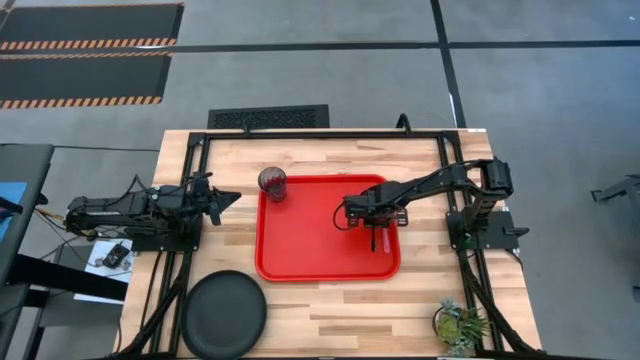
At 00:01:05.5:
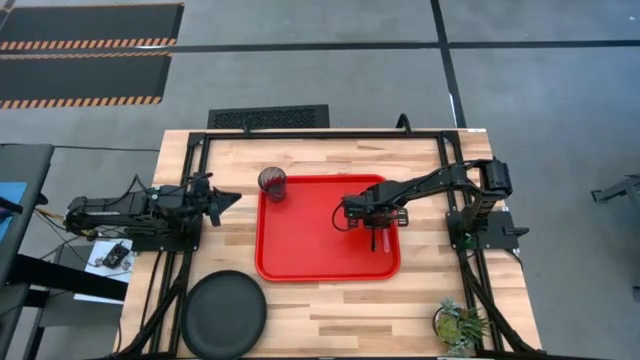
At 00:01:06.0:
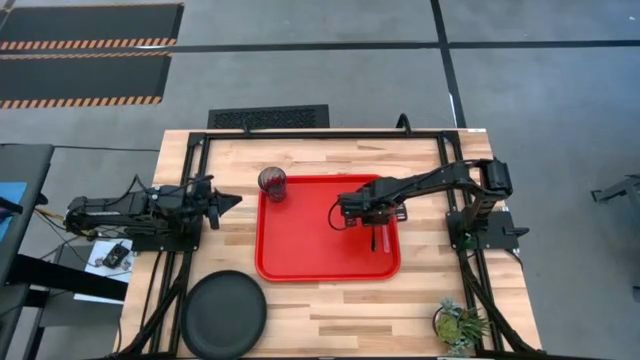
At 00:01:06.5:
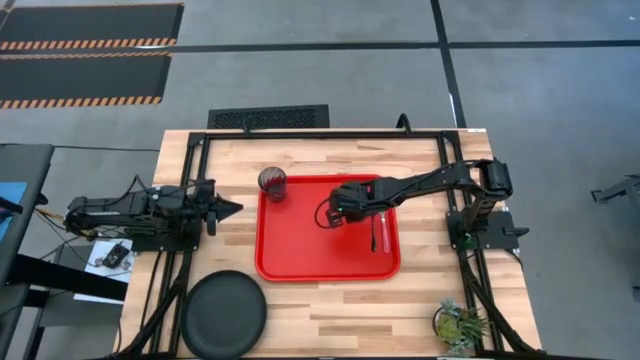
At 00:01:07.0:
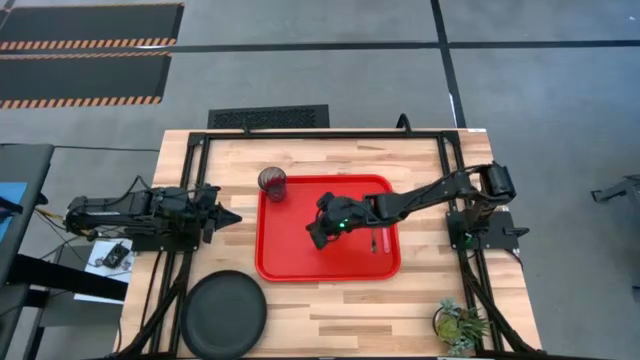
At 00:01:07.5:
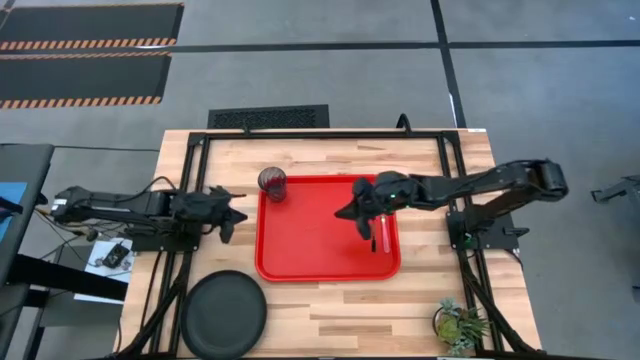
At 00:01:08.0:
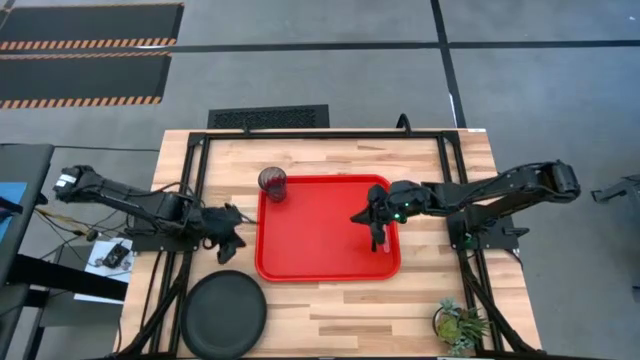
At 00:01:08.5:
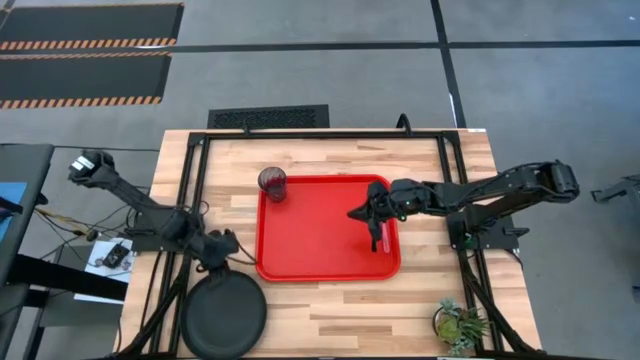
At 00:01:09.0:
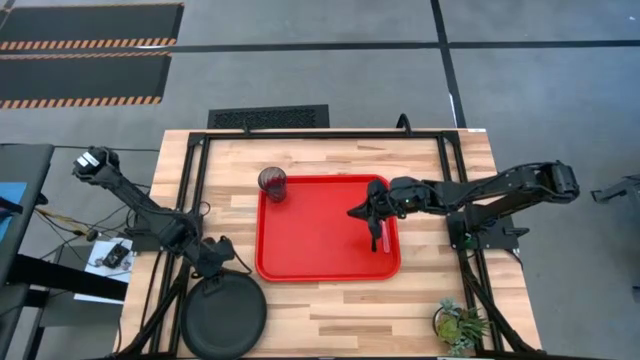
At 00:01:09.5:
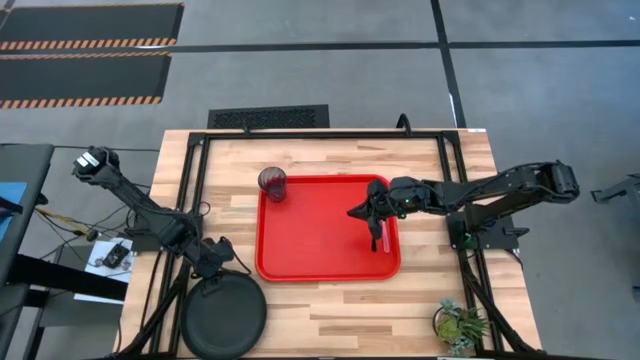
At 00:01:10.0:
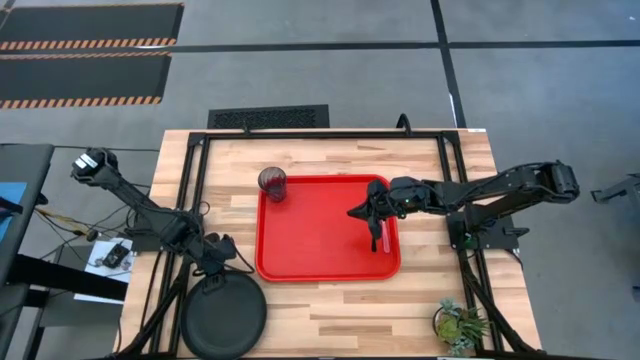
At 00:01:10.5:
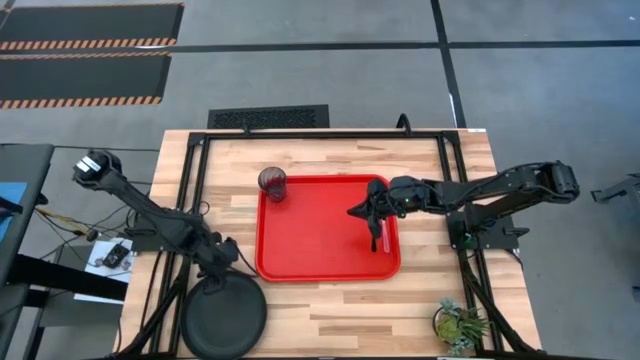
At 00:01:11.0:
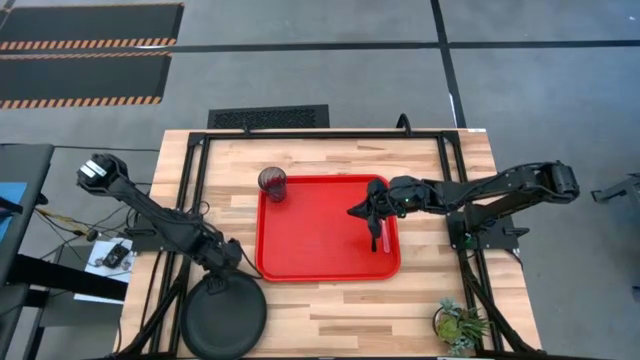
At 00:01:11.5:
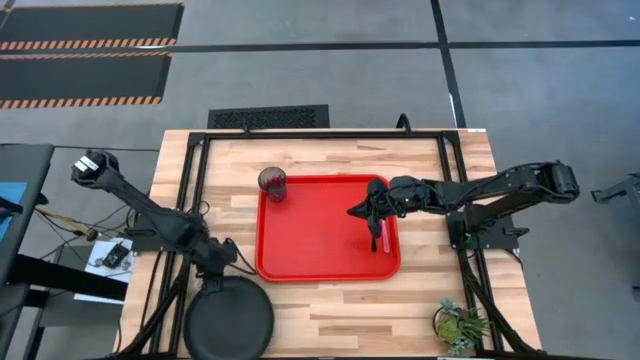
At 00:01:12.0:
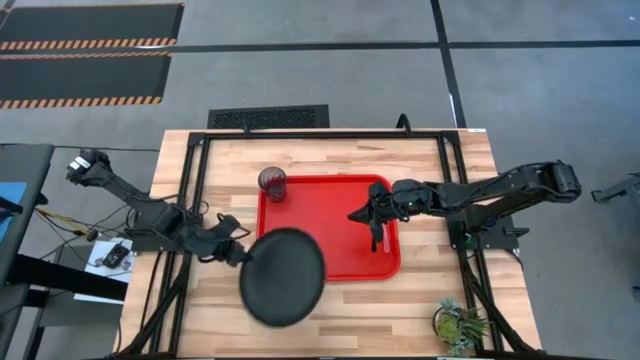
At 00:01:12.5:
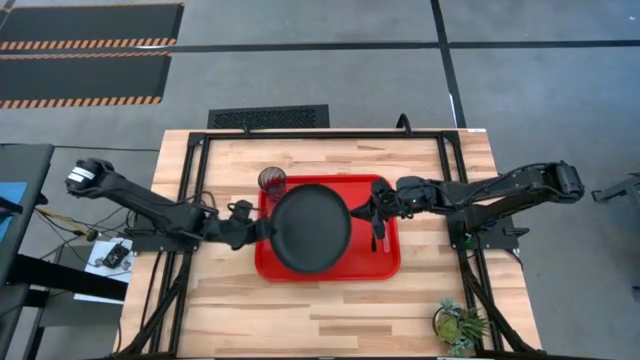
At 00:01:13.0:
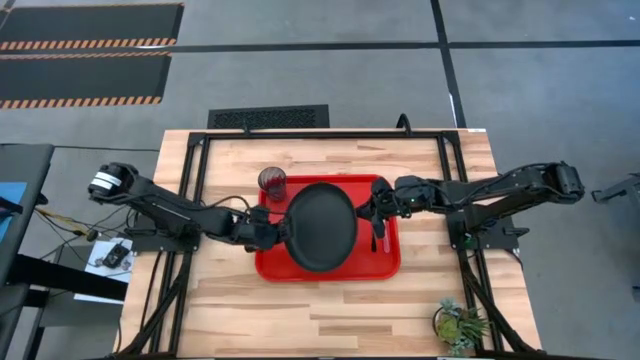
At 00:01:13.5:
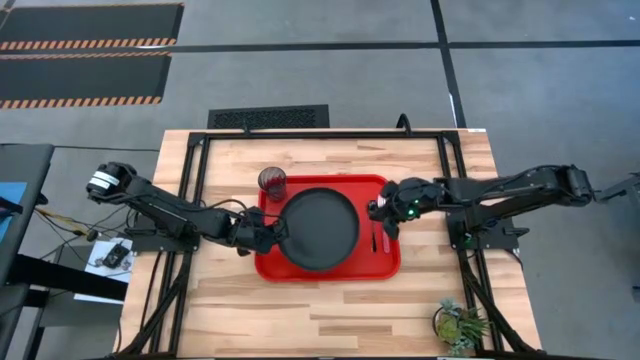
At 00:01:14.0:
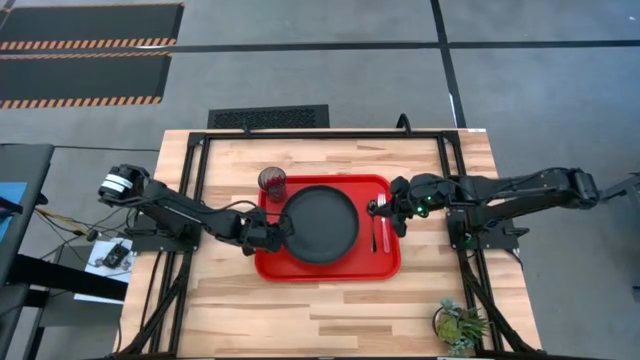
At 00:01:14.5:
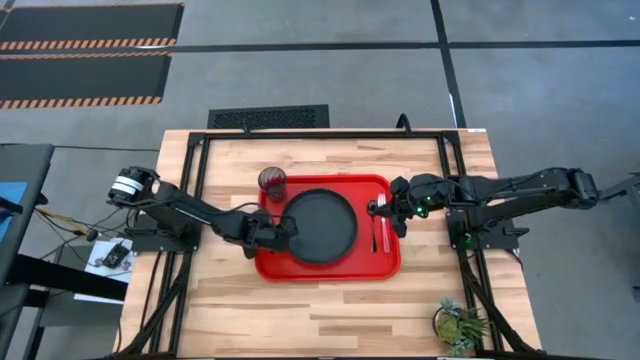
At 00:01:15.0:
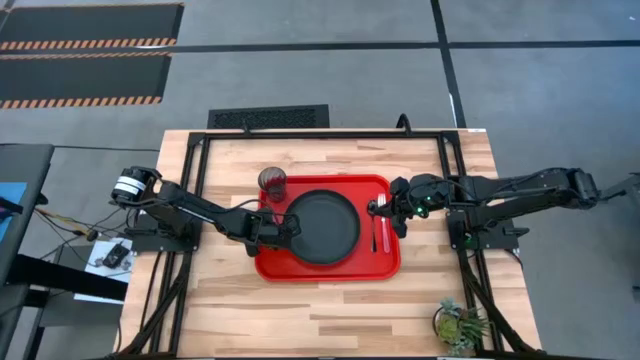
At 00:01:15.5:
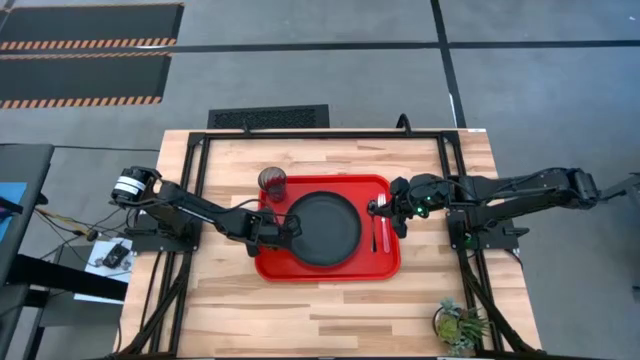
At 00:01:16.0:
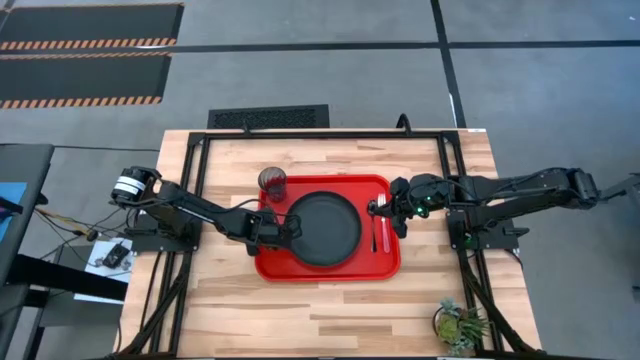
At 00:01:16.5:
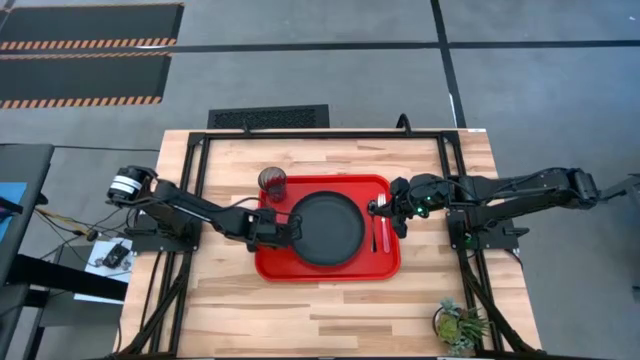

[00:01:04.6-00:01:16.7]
Task: Pick and place plate/cup/fork/spoon on tray
Put the black plate in the middle of the red tray

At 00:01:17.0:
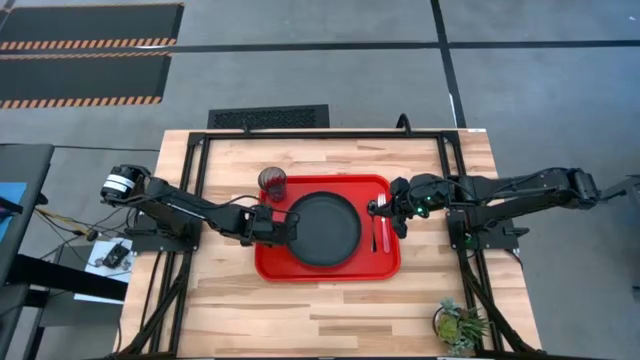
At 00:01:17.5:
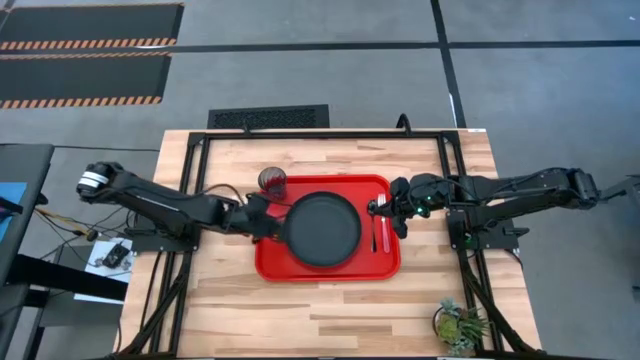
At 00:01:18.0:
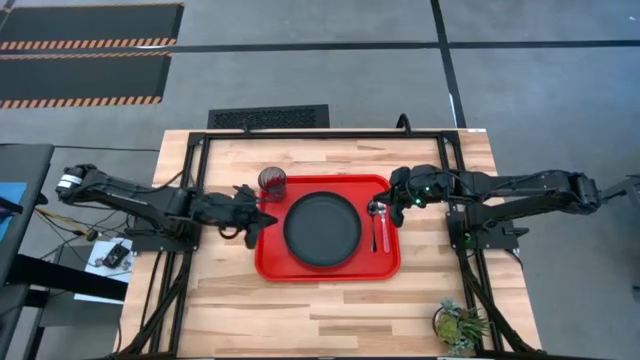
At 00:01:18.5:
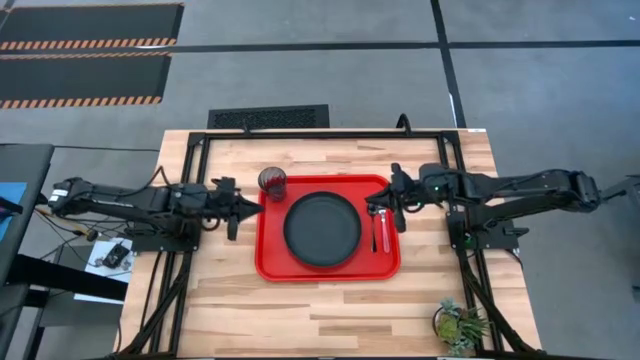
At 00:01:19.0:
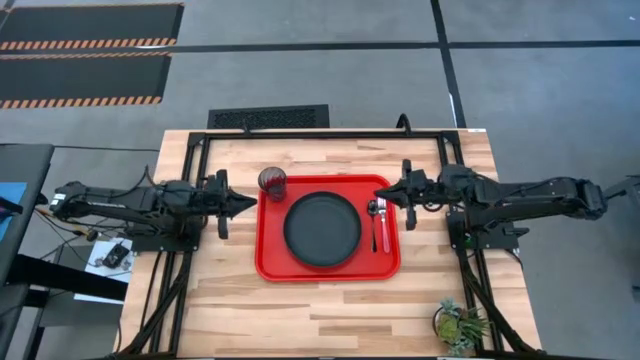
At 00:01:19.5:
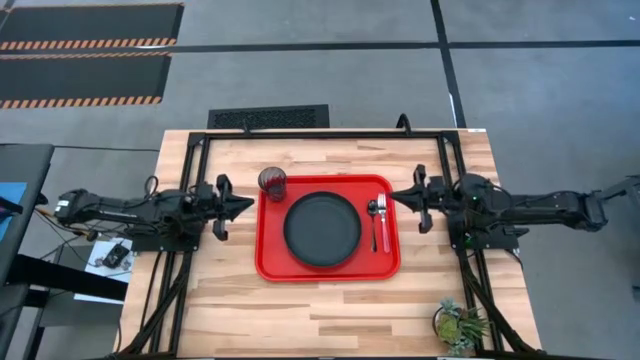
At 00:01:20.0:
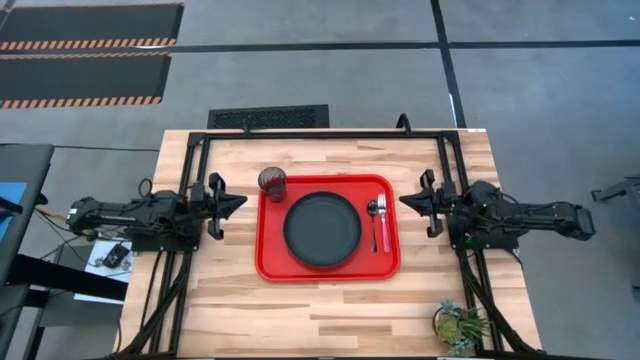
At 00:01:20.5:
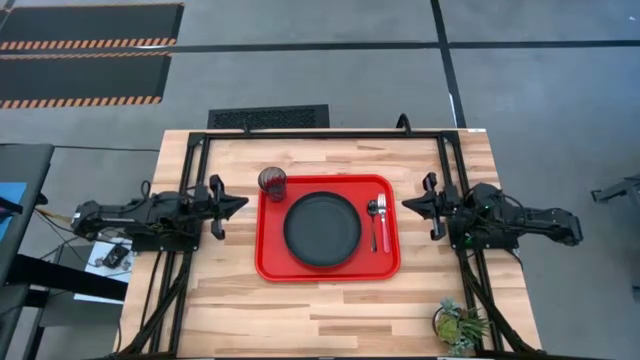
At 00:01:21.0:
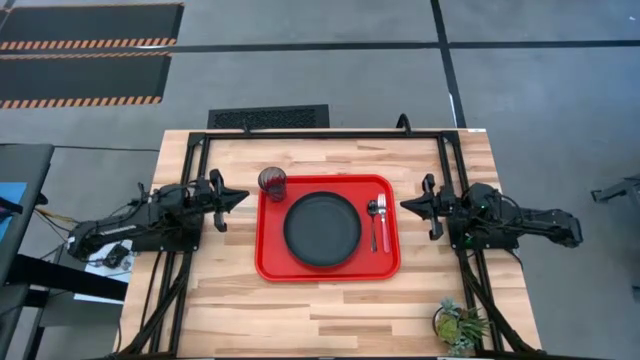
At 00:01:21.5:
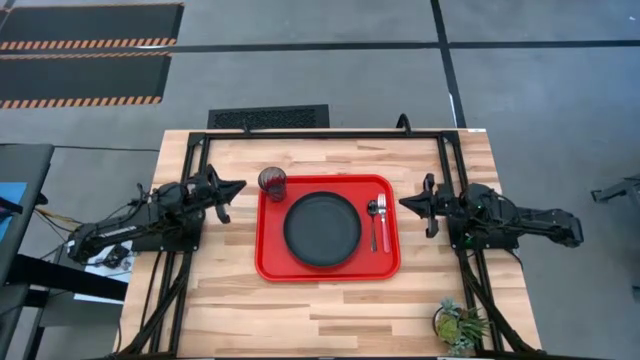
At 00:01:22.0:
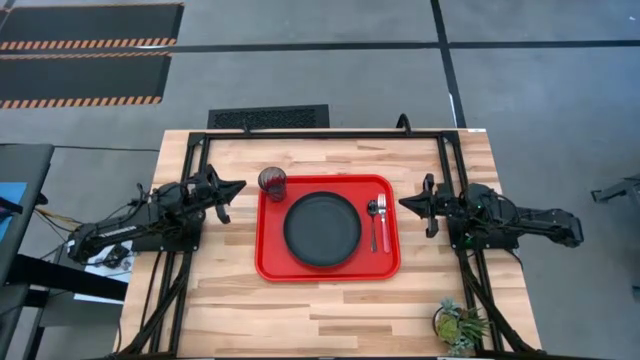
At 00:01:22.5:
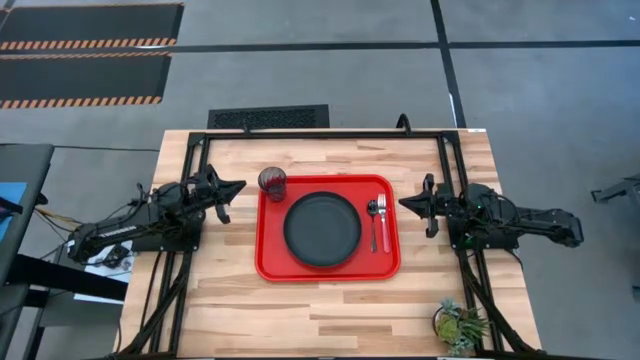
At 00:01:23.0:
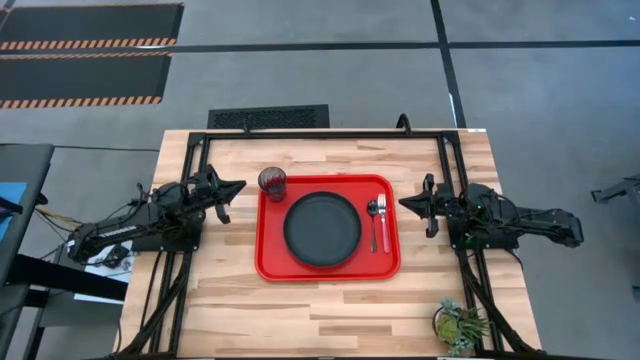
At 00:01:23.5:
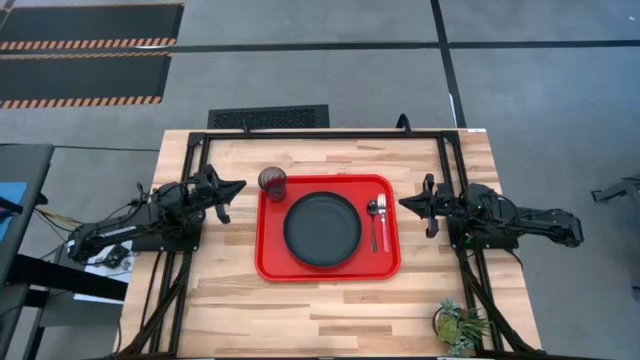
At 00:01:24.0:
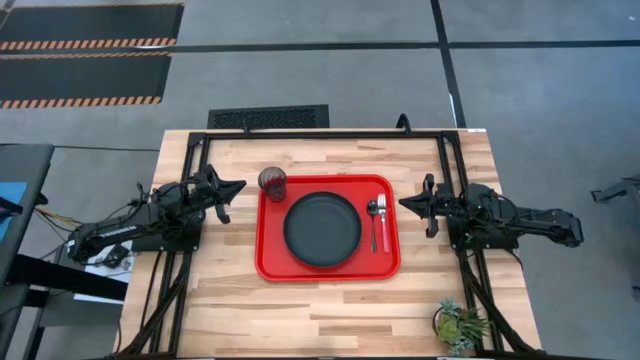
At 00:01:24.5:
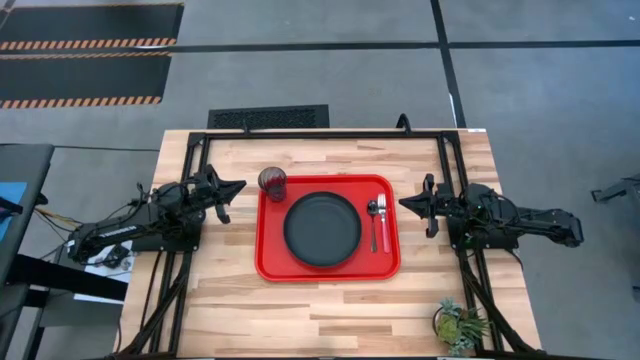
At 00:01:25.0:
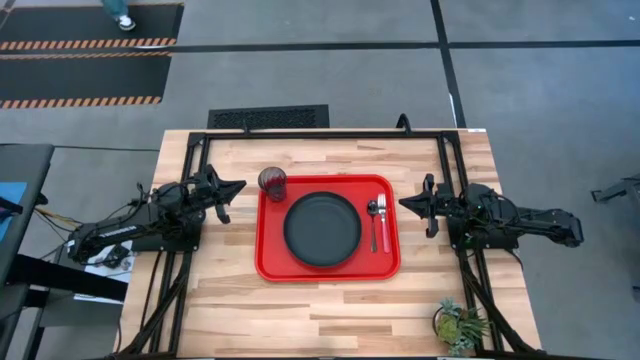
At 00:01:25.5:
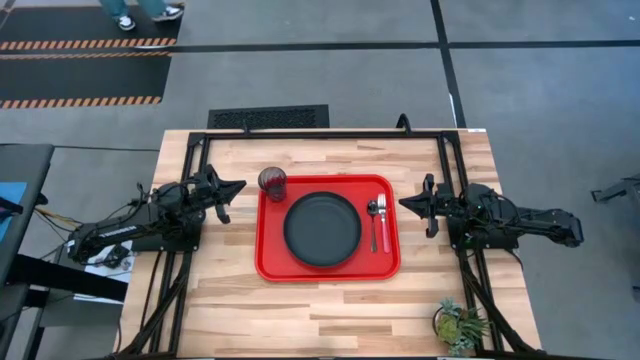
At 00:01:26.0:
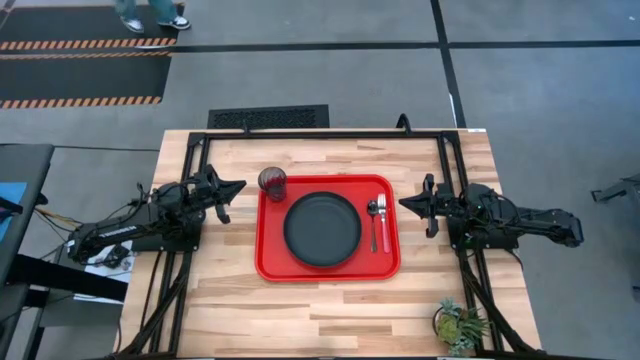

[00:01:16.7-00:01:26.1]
Return to Home Position
